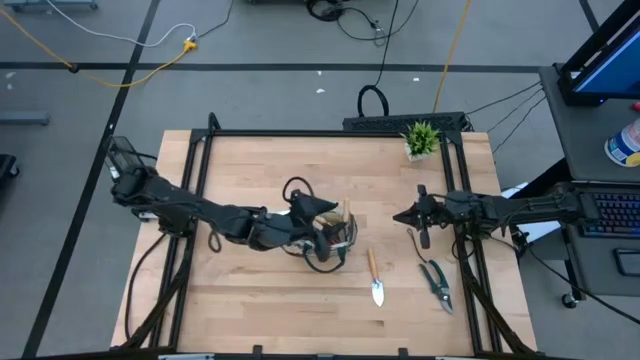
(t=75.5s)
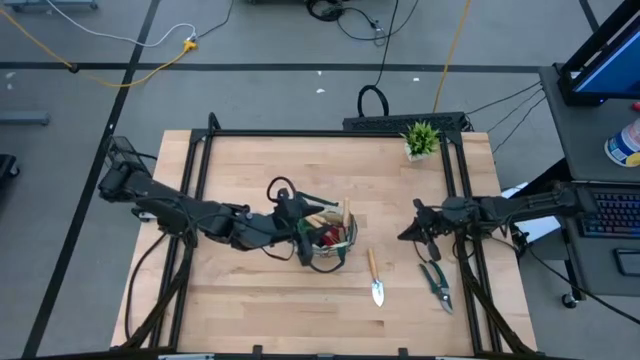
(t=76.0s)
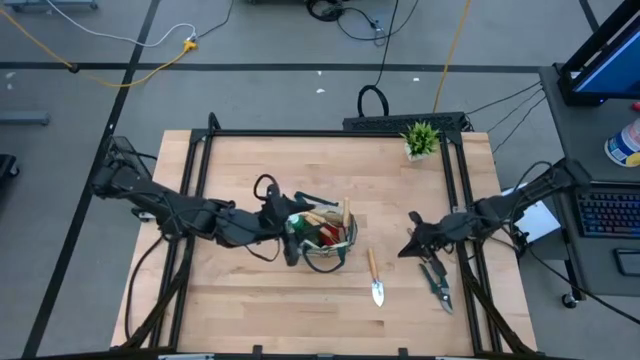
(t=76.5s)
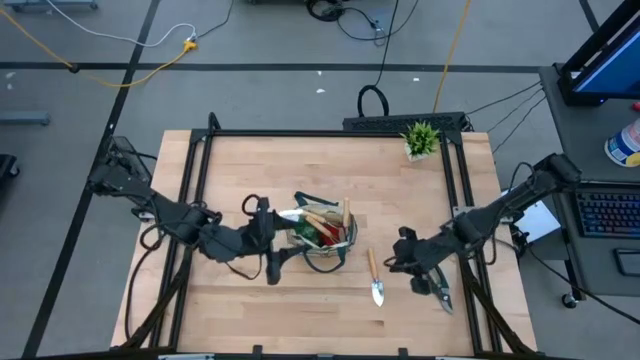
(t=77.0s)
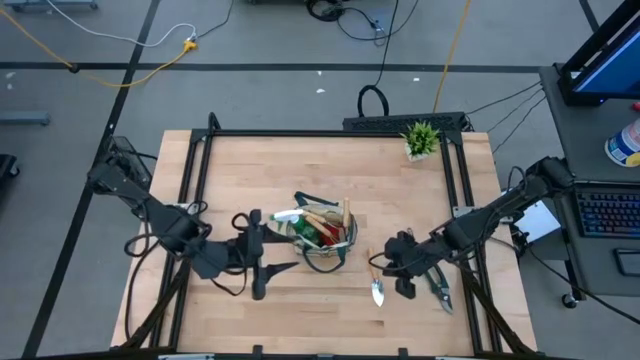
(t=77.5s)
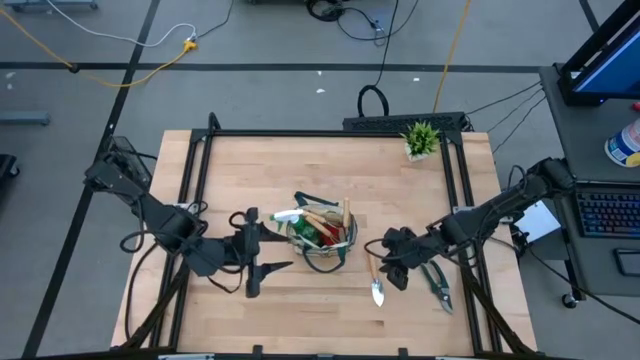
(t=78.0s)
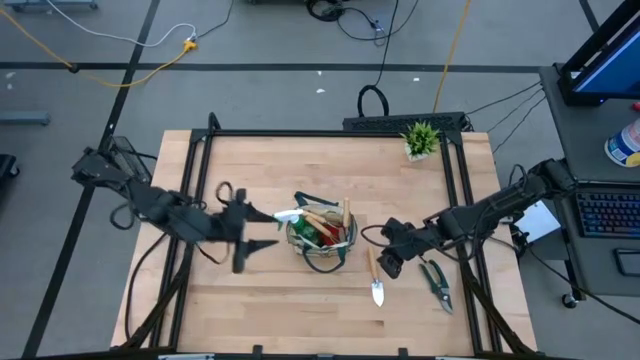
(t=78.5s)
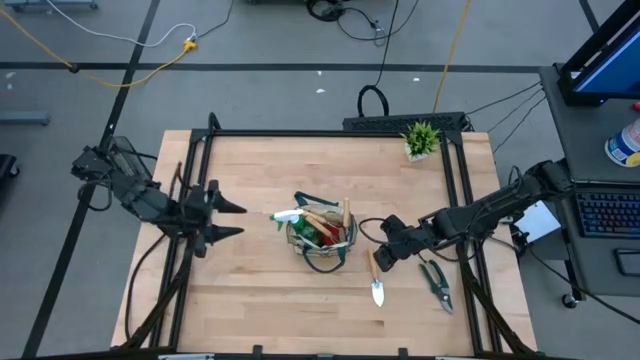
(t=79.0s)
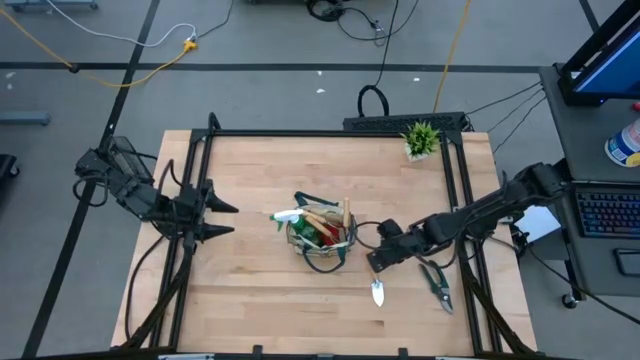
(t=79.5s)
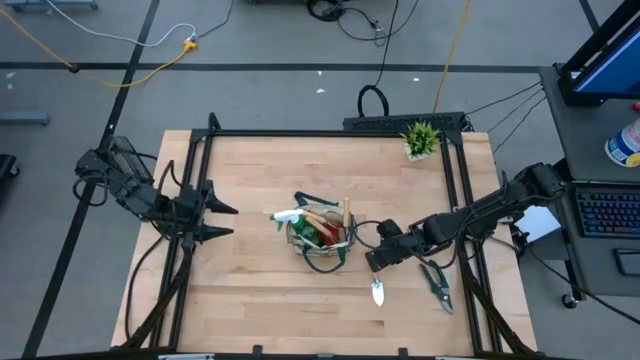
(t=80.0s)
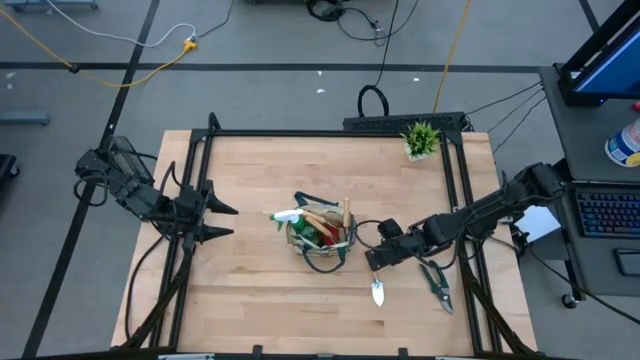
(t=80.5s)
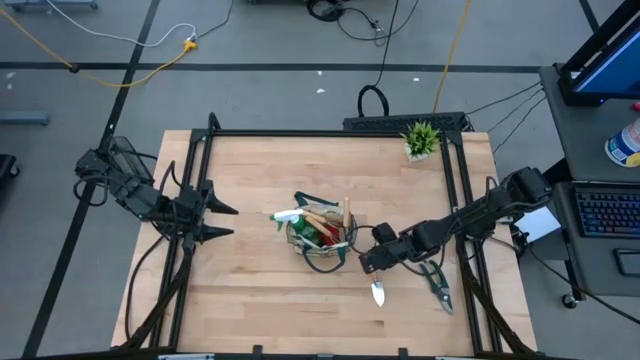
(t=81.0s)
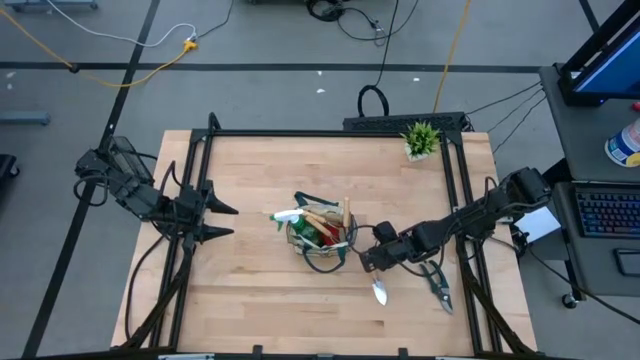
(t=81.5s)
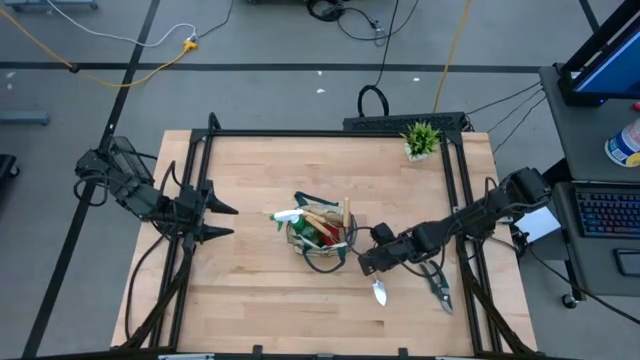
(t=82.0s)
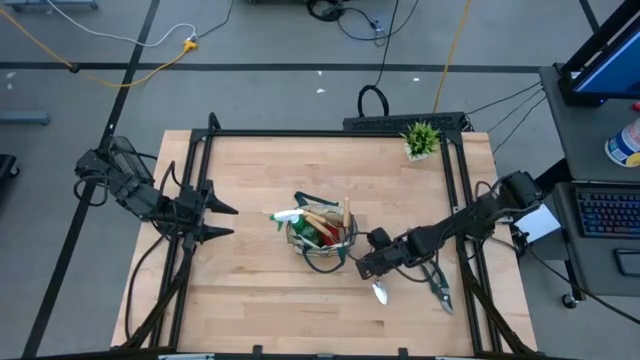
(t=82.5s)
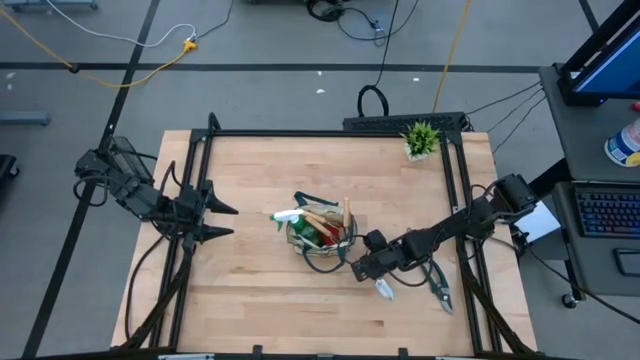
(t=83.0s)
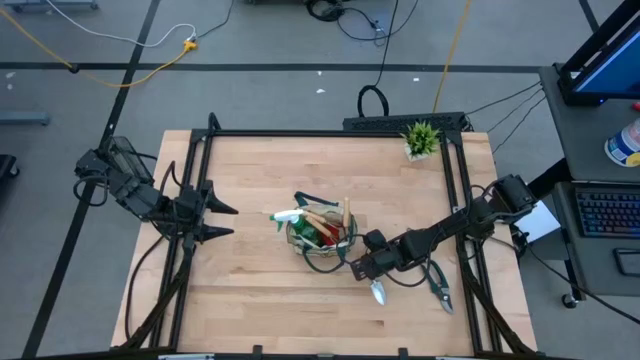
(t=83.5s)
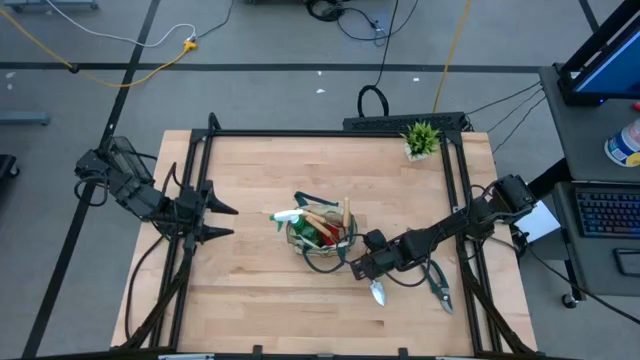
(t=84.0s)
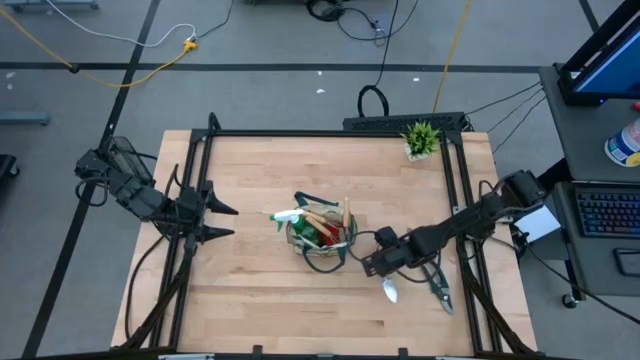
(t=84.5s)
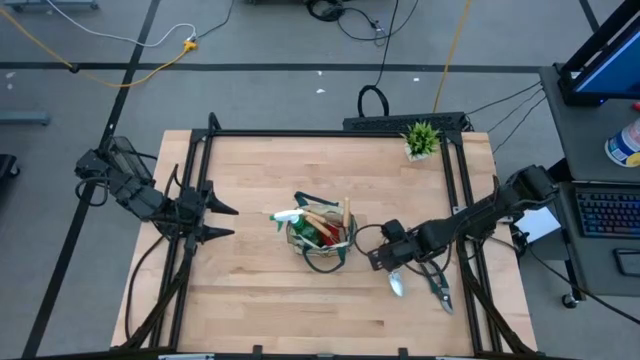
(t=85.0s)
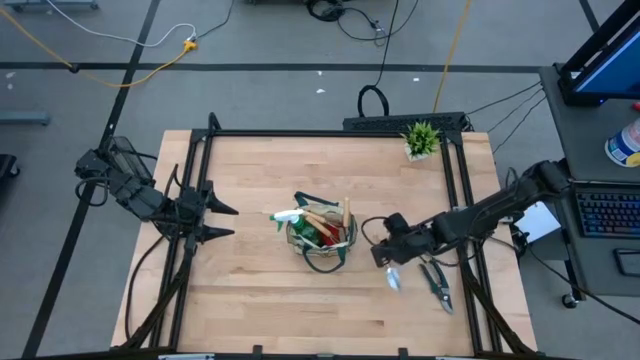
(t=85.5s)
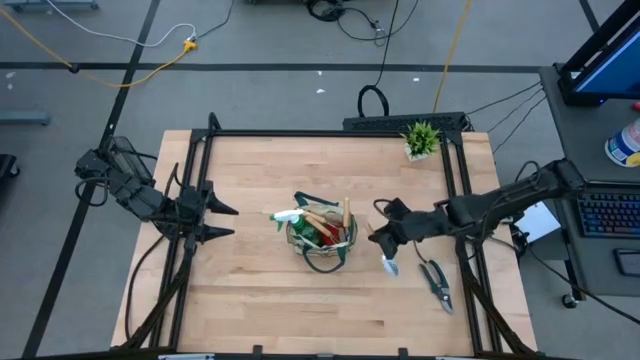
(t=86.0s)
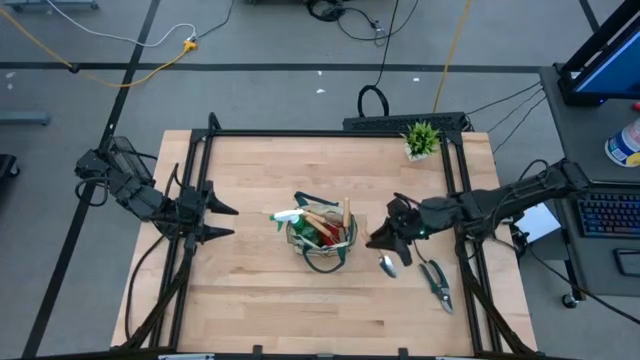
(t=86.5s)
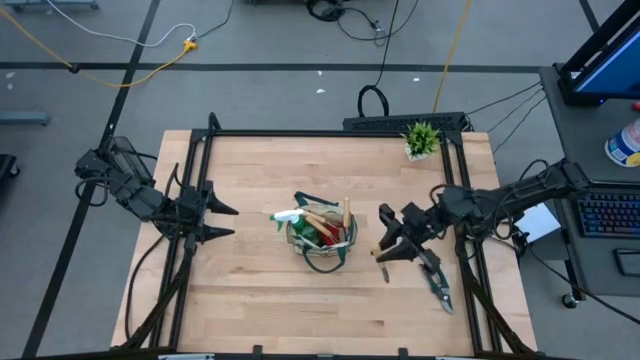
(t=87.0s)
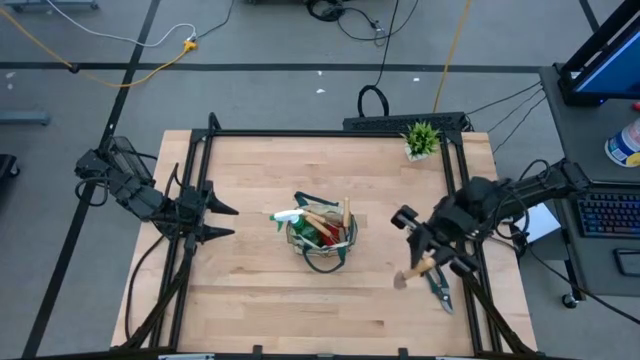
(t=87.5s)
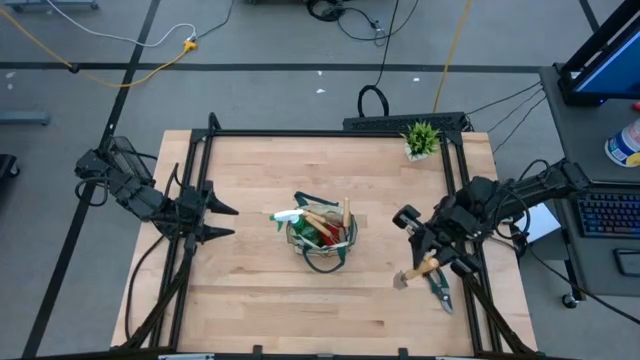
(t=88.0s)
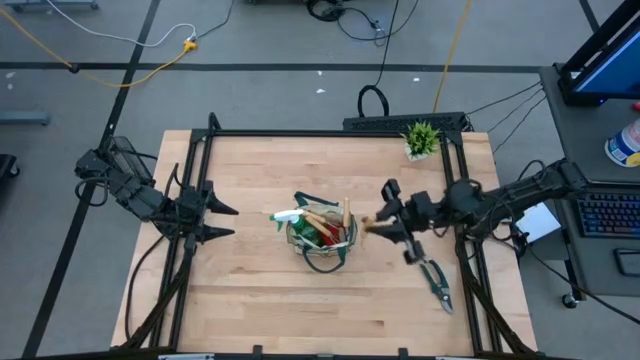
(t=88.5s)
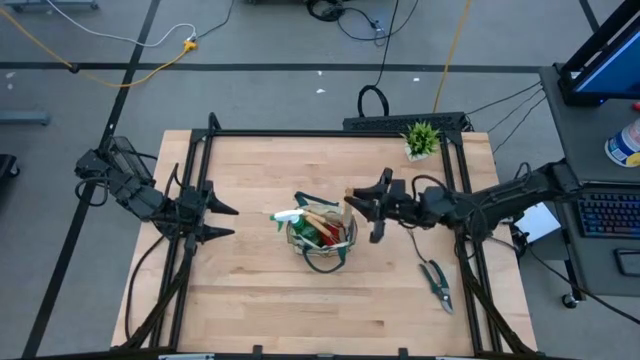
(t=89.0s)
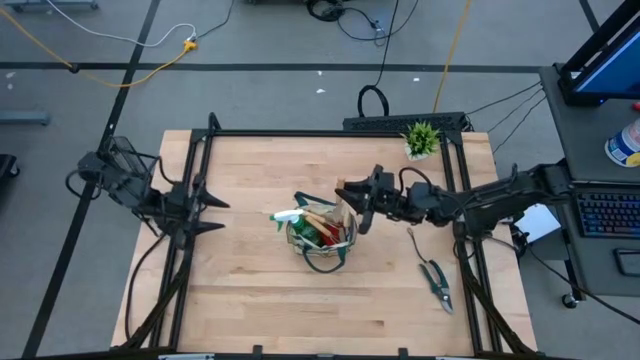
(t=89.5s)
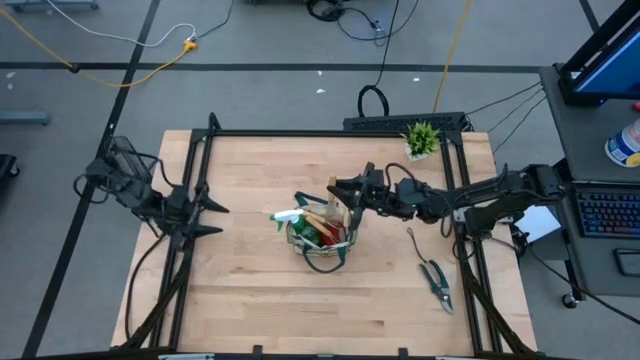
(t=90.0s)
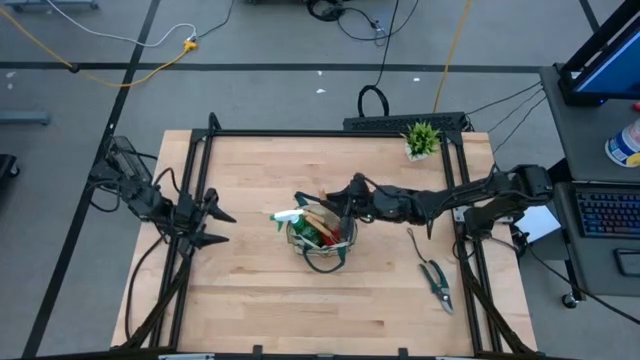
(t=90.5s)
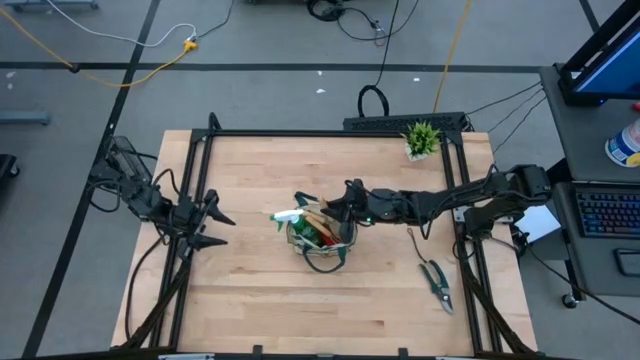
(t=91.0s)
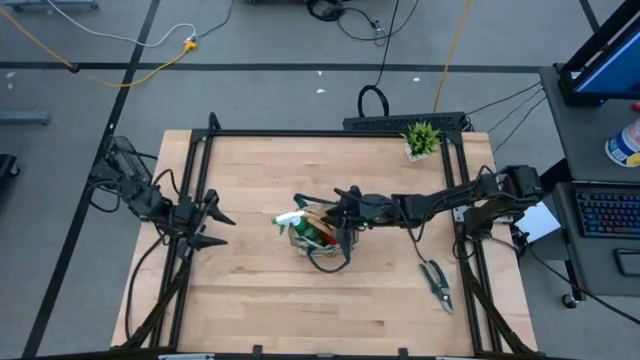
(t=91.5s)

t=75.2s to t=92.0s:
Task: Pick & Place Garden tools in Gardening bag
Put the brown trowel into the gardening bag

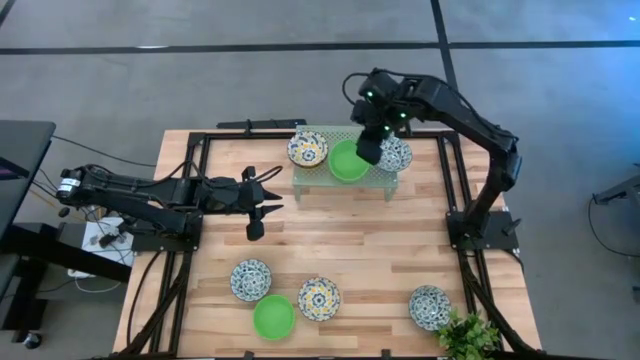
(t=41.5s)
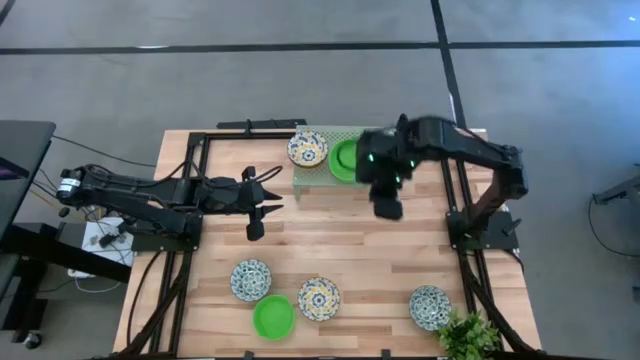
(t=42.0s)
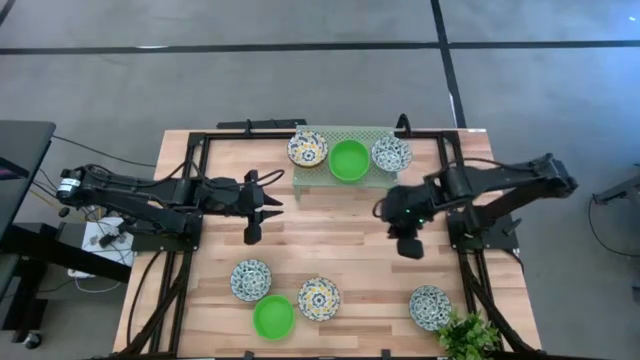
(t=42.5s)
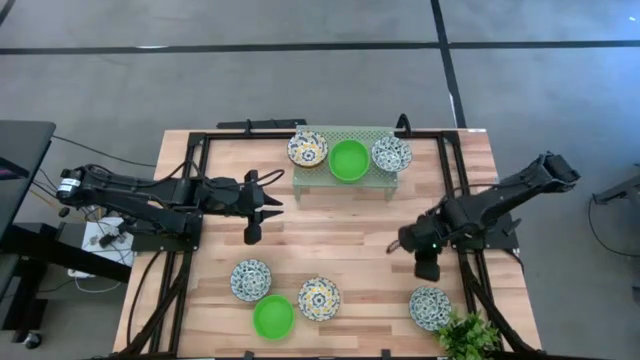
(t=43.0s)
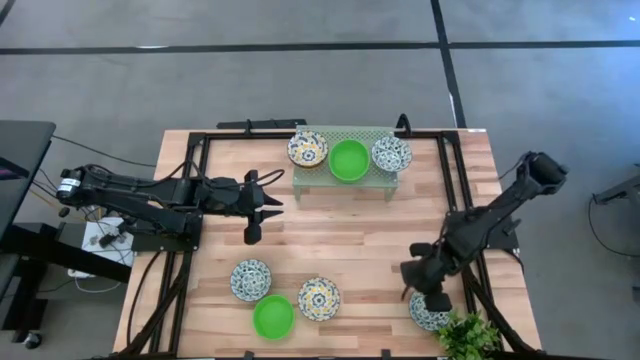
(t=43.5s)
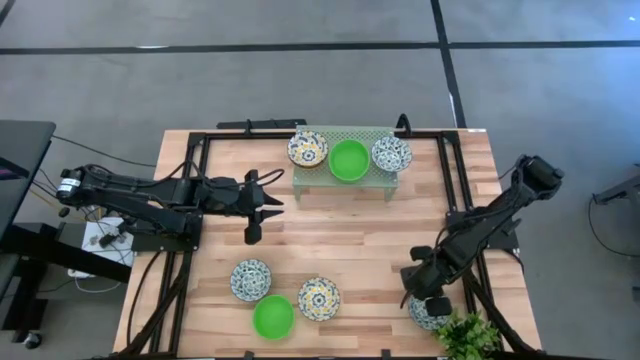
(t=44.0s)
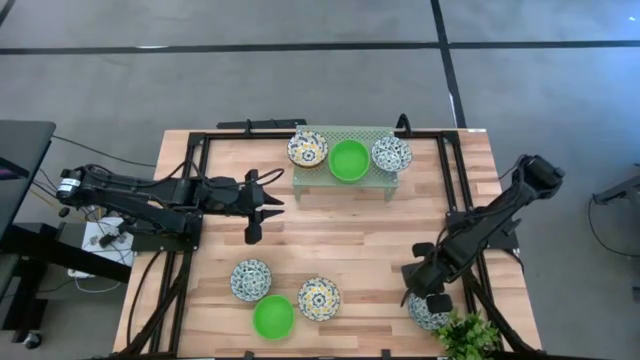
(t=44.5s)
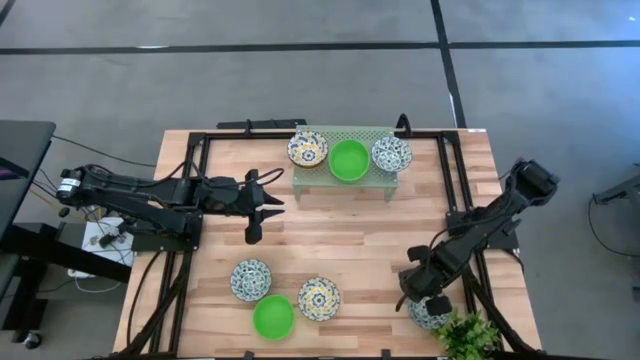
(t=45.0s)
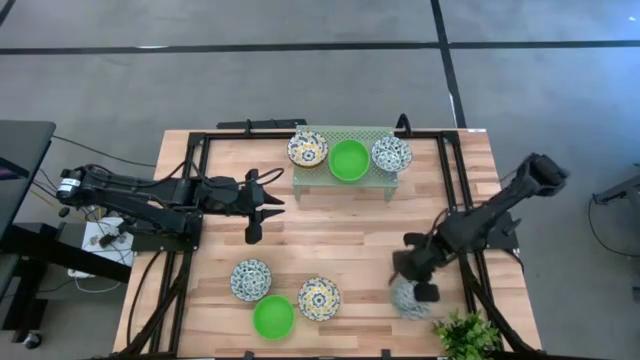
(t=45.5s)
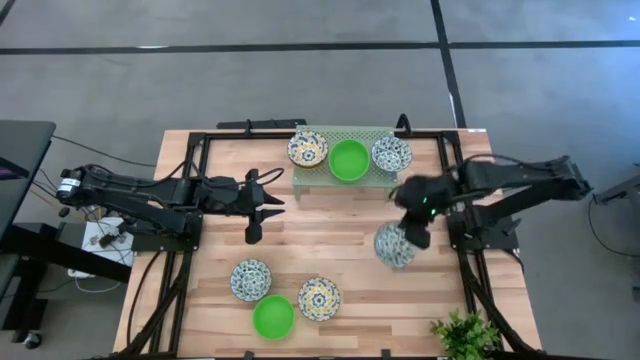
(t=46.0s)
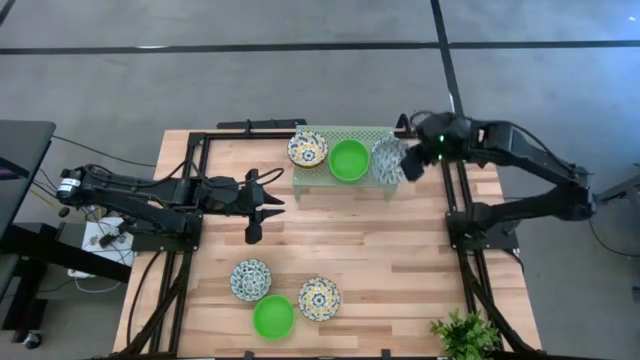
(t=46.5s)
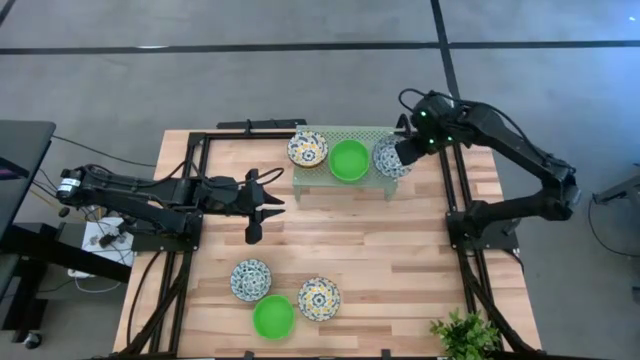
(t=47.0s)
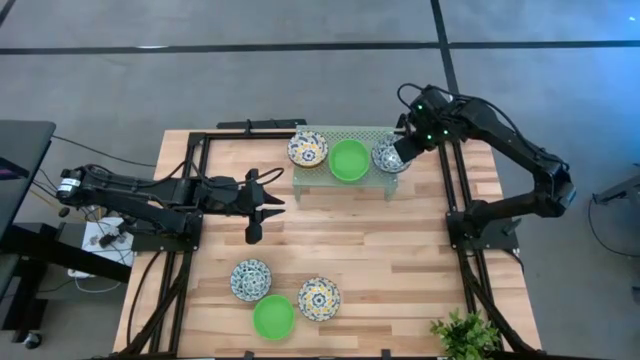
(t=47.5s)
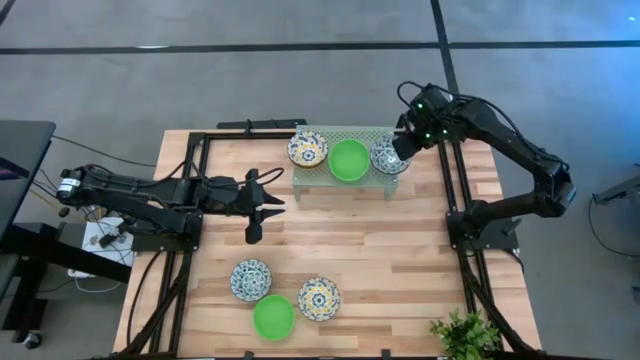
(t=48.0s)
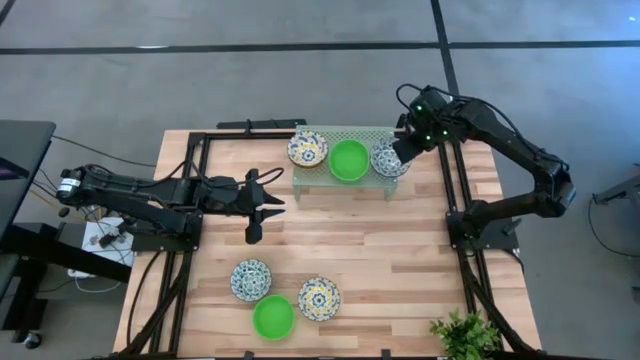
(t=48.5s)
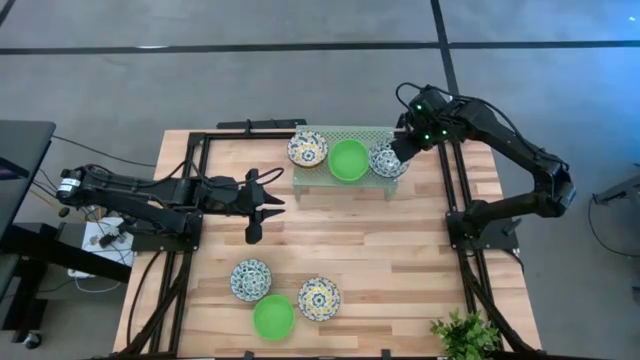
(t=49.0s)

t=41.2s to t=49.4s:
Task: Pick & Place Mini bowls
Stack the right light blue bowl on the light blue bowl on the shelf
